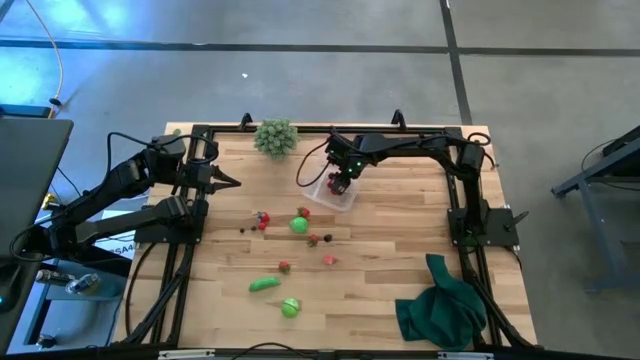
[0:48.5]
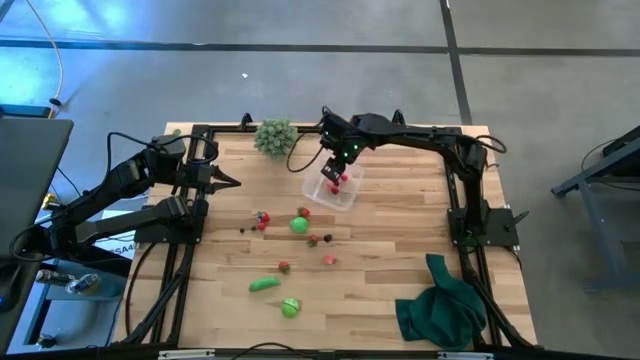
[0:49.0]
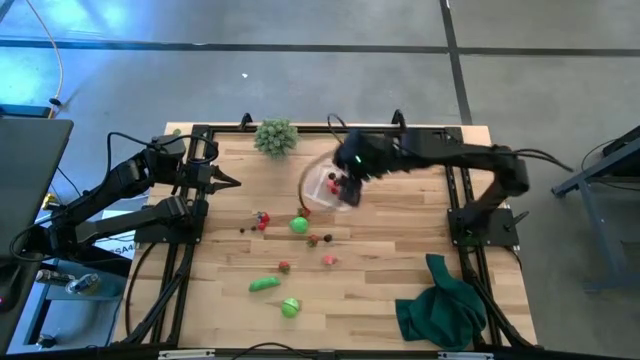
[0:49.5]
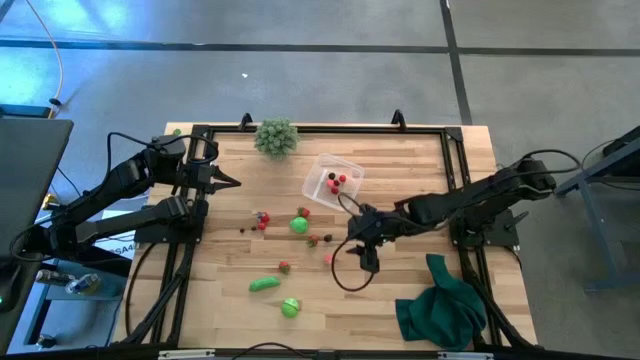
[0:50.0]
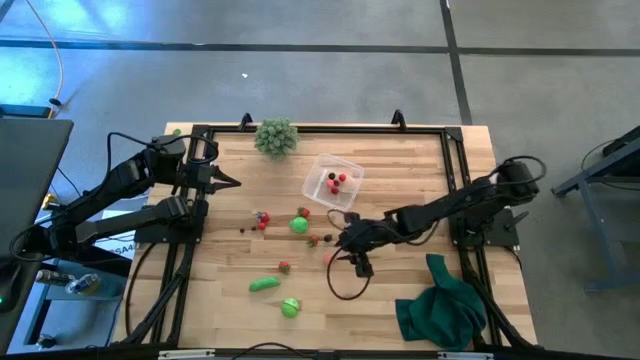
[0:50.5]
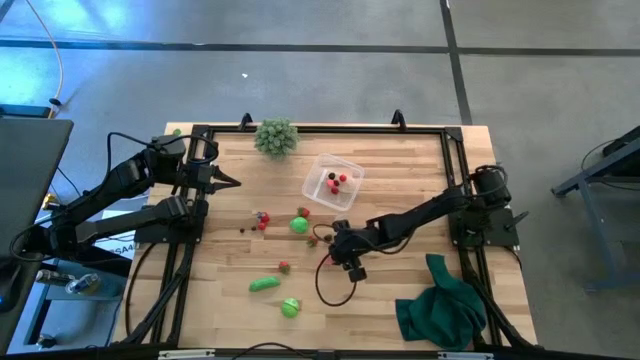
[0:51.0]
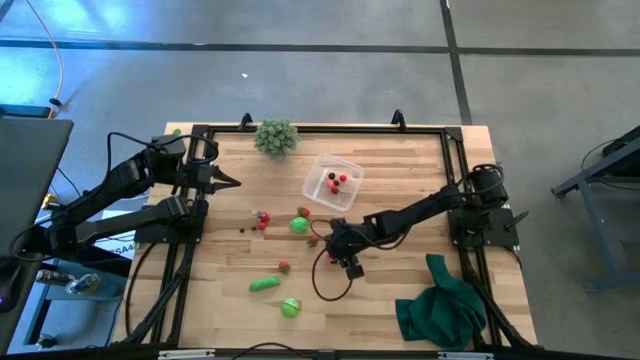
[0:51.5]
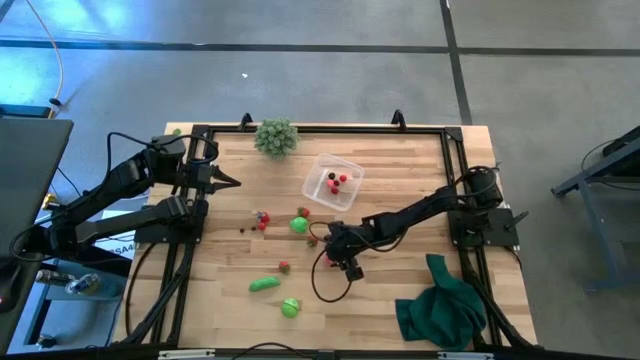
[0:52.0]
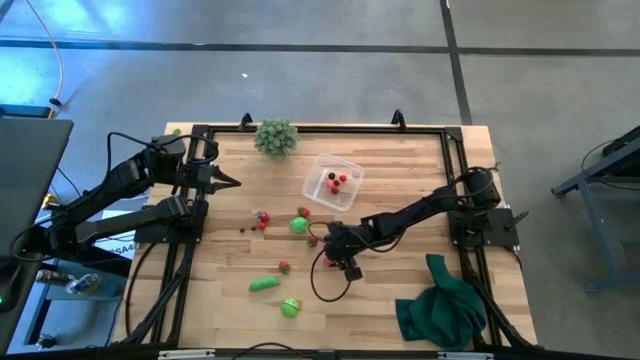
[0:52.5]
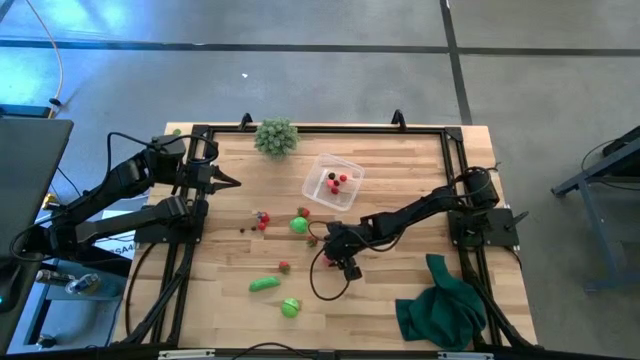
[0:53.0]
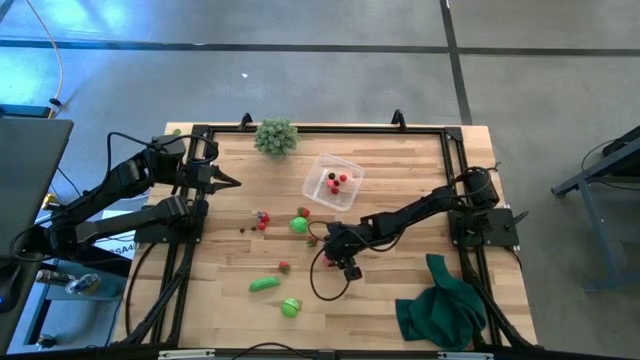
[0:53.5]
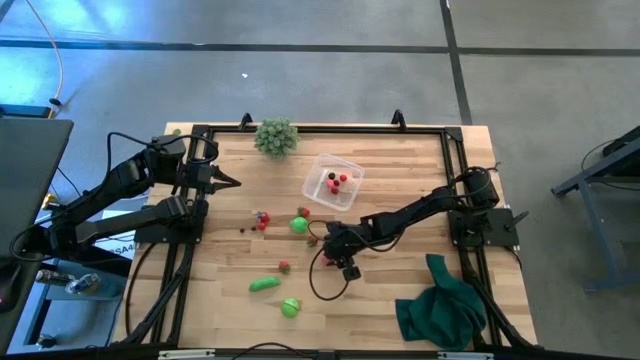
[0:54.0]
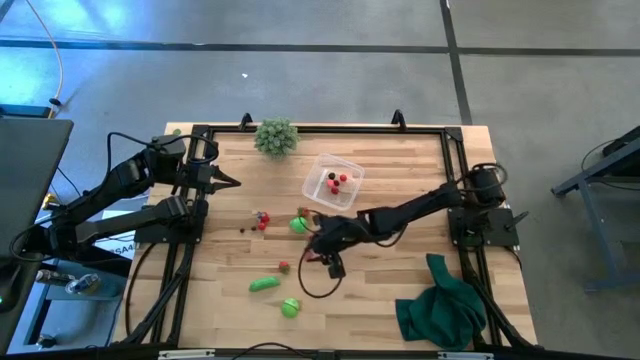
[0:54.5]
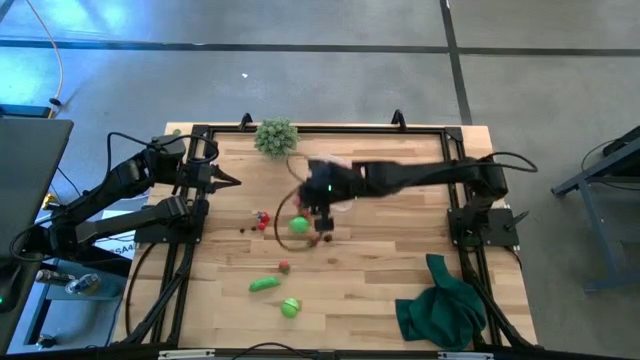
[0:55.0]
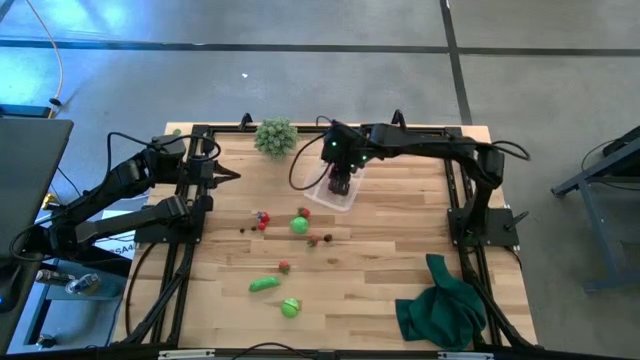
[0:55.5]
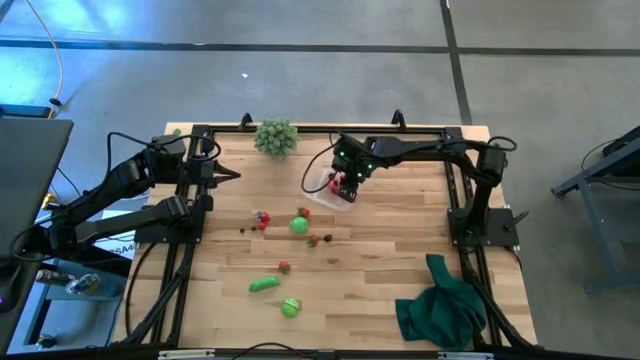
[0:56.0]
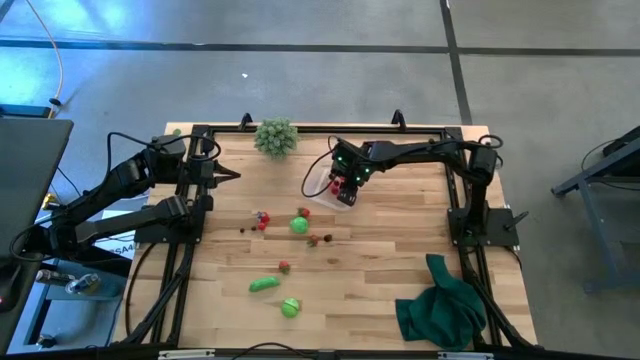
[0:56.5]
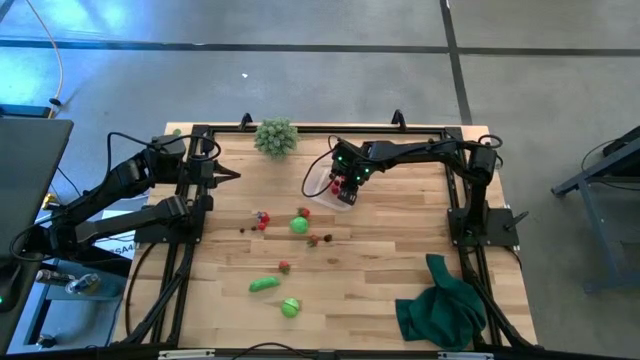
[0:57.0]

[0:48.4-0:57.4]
Task: Pick and placing Produce into tupperware
Put the peach into the transparent container

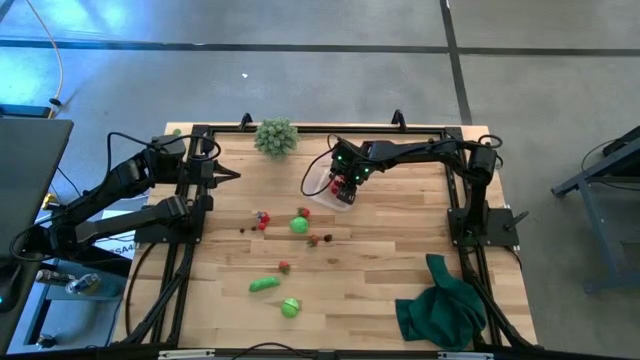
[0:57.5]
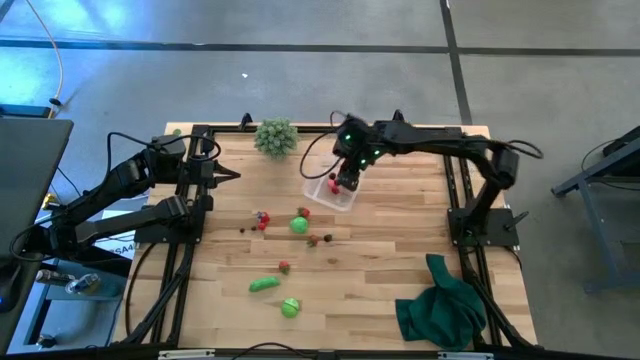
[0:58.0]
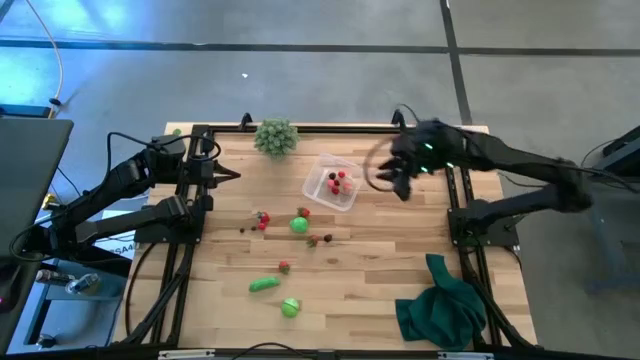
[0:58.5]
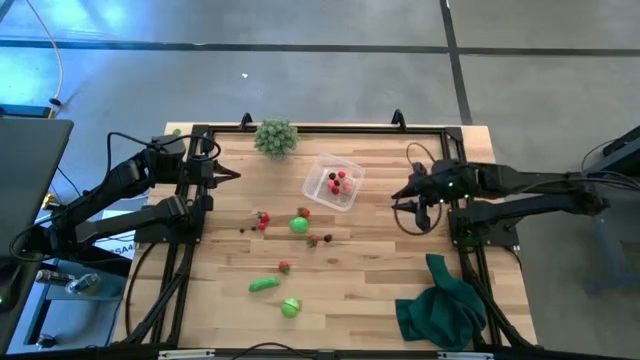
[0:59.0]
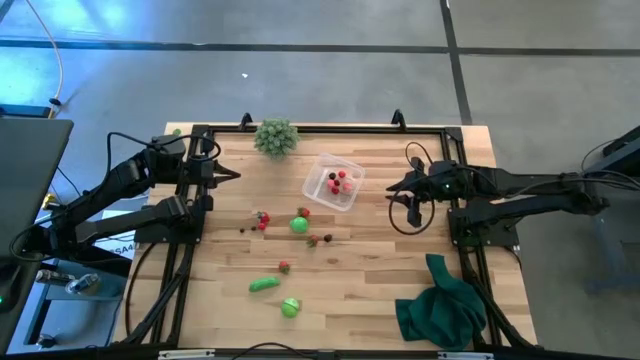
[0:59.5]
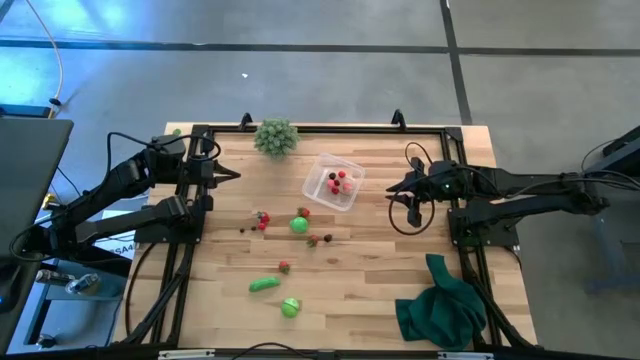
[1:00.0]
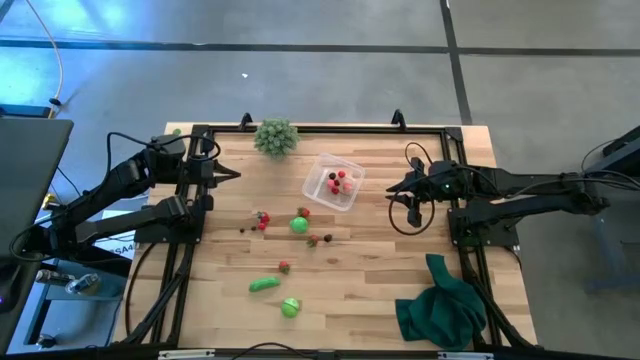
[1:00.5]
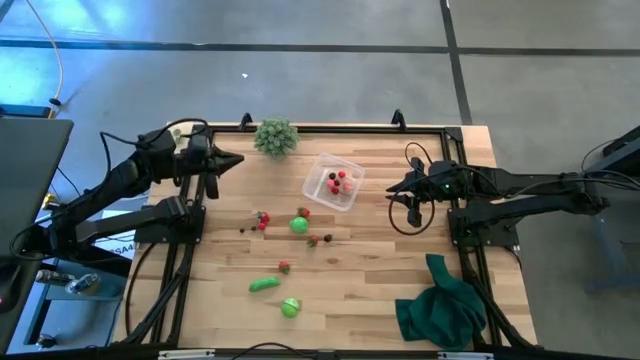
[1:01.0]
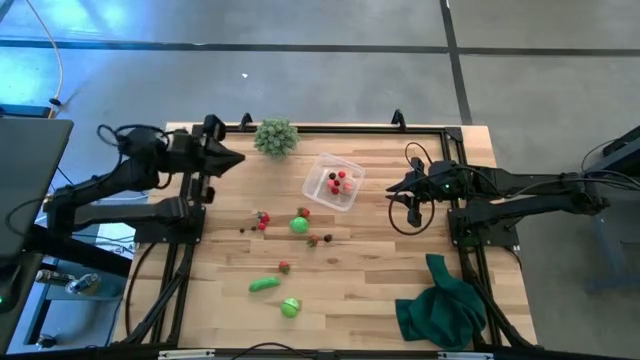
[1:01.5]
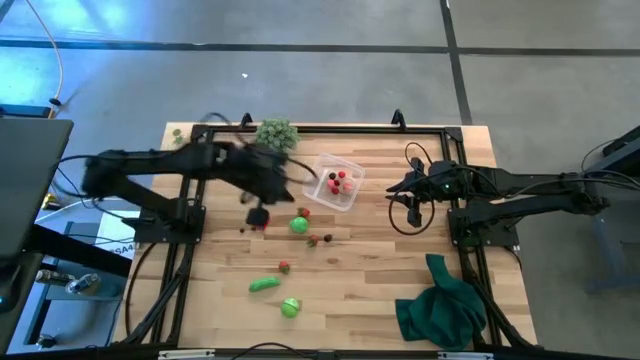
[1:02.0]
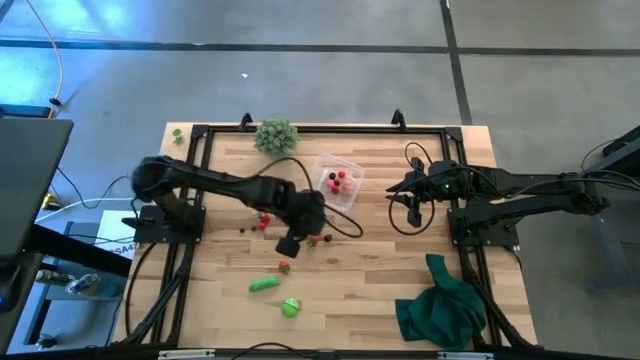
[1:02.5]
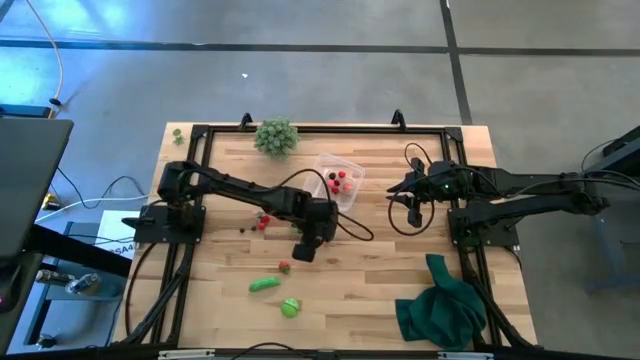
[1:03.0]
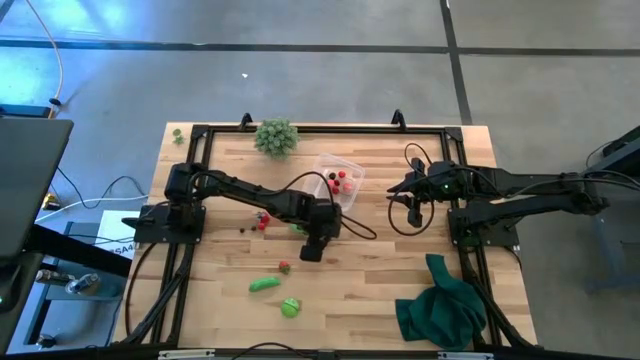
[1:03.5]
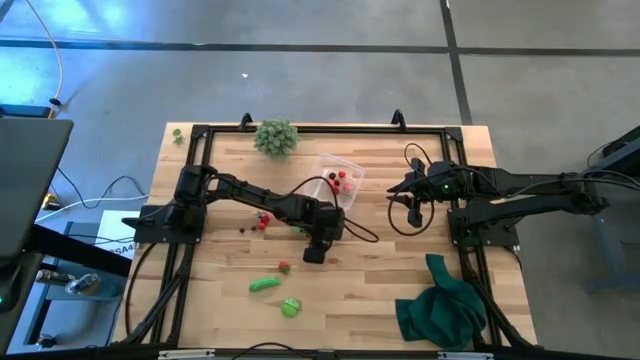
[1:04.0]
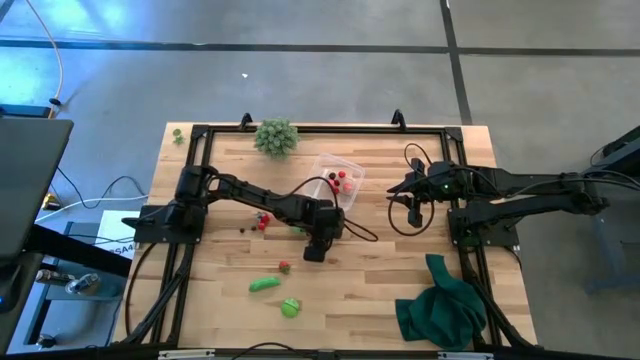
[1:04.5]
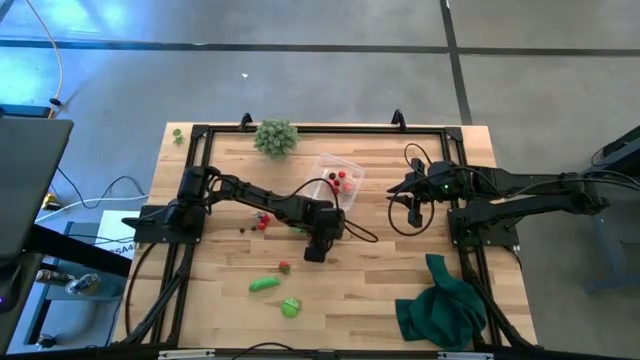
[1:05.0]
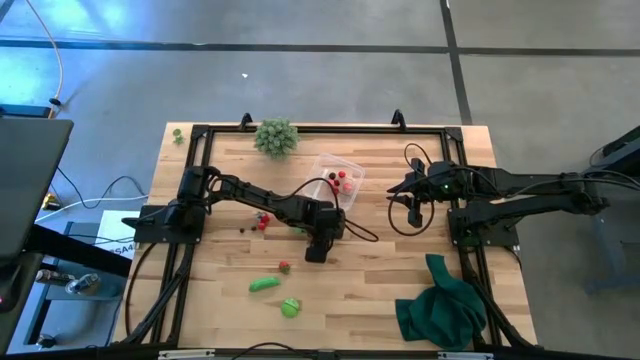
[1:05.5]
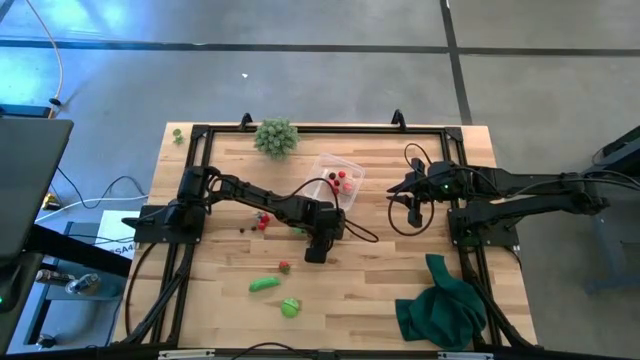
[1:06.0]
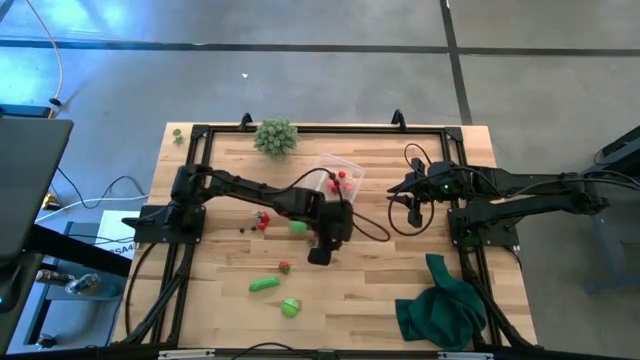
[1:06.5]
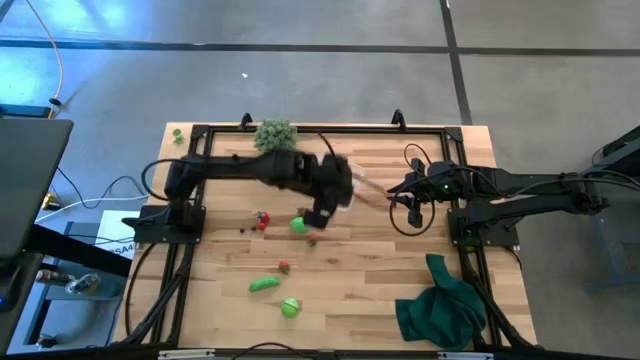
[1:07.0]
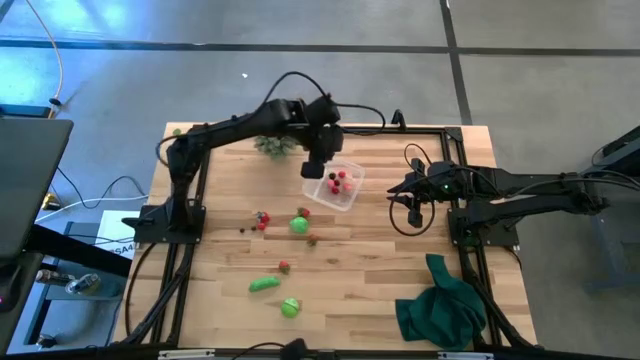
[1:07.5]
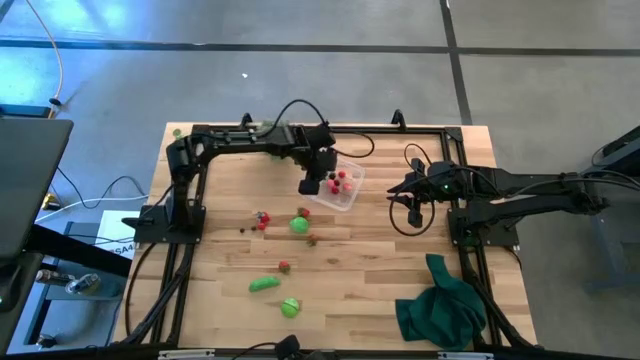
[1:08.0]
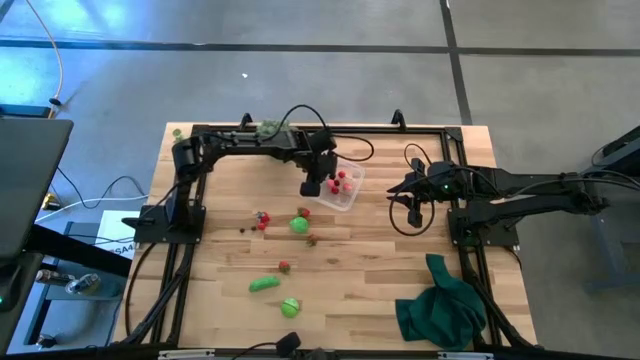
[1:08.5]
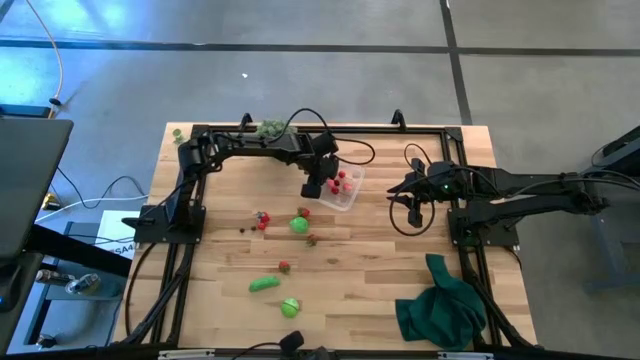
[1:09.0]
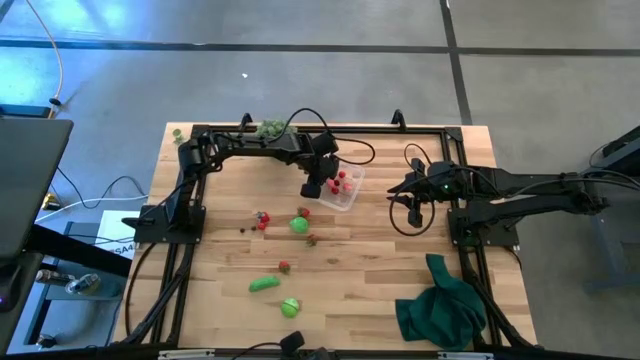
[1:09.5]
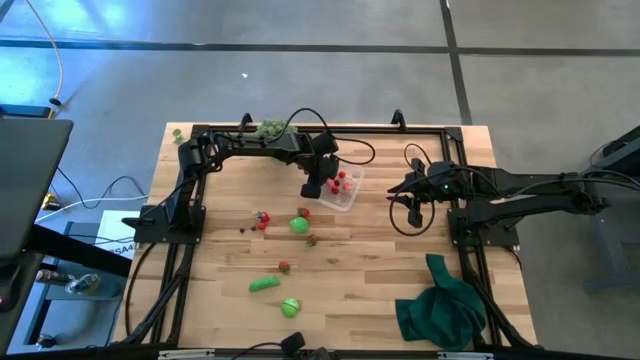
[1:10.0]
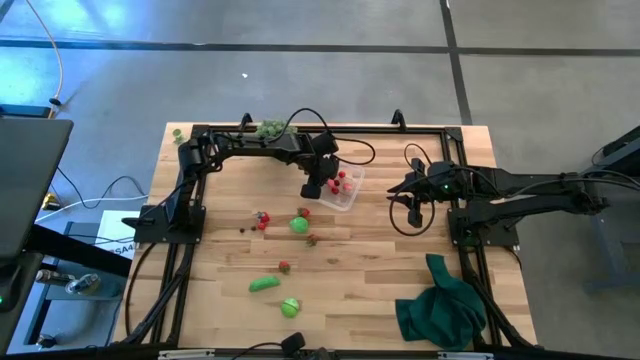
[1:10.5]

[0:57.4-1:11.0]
Put the blackberry into the transparent container
